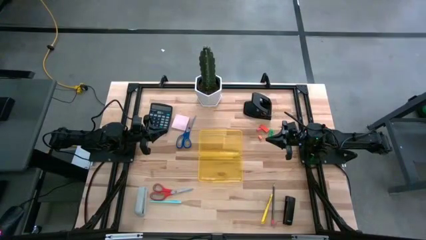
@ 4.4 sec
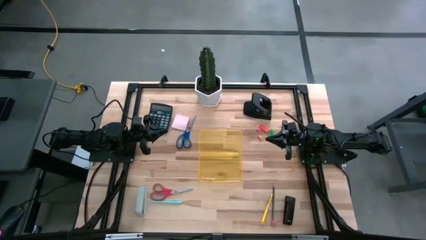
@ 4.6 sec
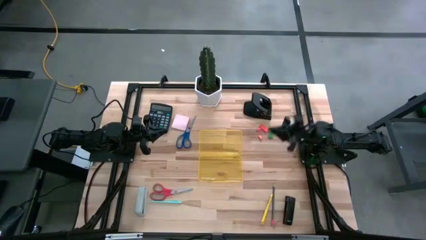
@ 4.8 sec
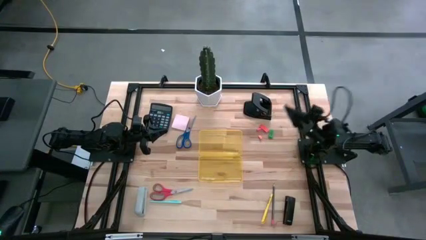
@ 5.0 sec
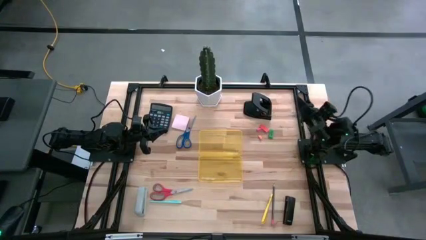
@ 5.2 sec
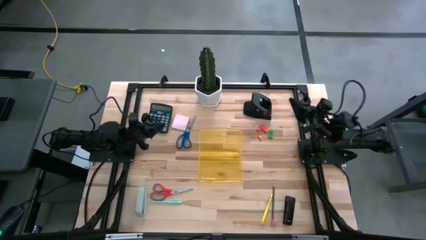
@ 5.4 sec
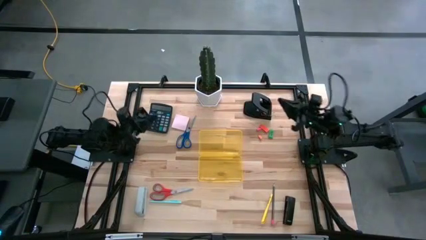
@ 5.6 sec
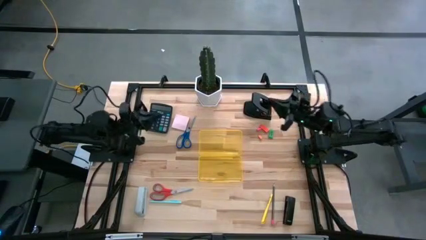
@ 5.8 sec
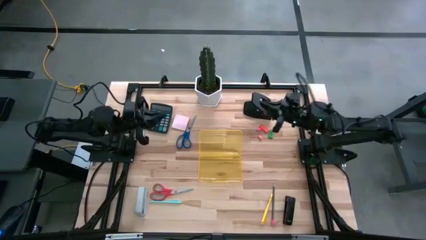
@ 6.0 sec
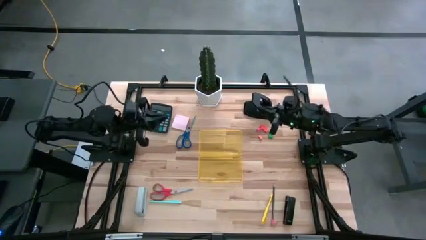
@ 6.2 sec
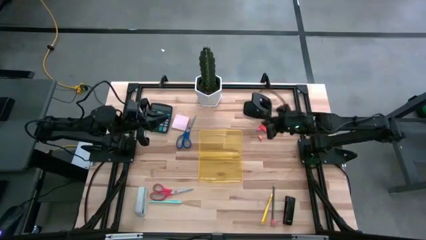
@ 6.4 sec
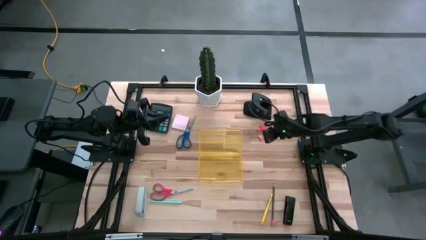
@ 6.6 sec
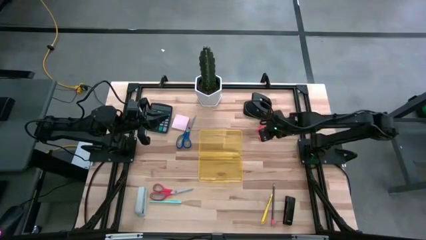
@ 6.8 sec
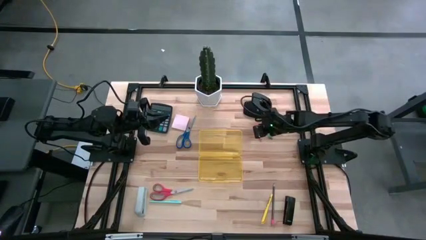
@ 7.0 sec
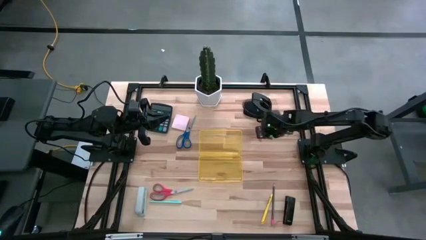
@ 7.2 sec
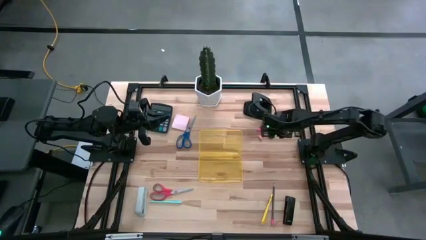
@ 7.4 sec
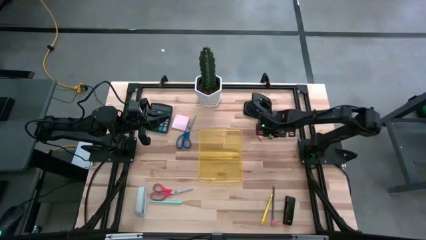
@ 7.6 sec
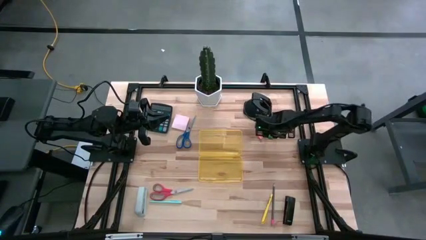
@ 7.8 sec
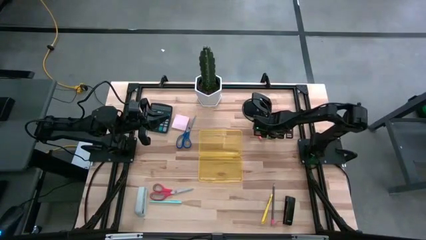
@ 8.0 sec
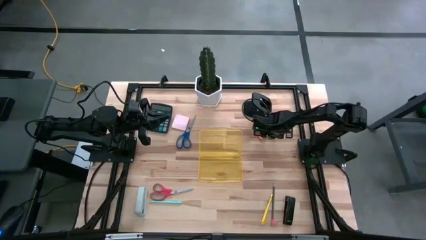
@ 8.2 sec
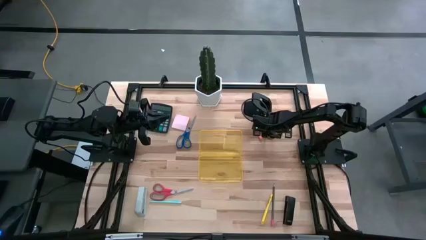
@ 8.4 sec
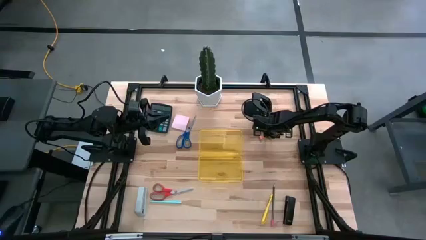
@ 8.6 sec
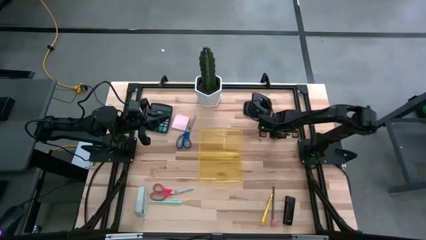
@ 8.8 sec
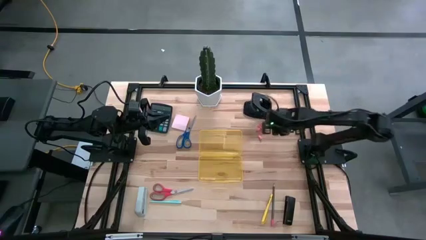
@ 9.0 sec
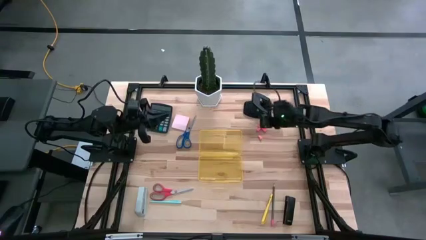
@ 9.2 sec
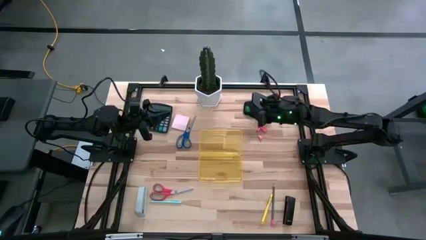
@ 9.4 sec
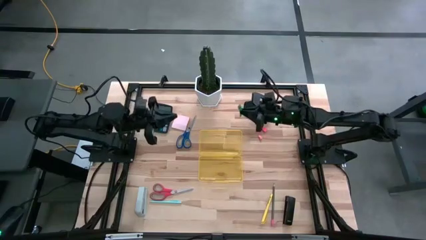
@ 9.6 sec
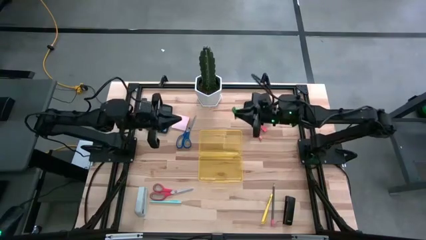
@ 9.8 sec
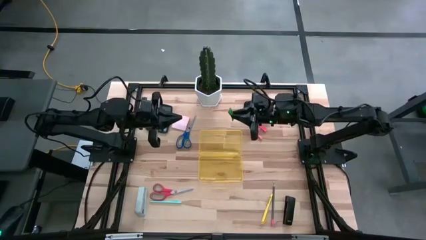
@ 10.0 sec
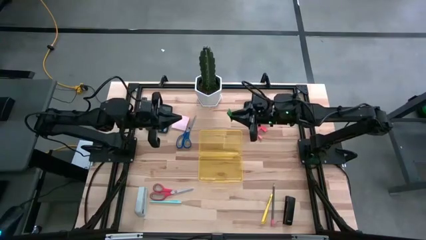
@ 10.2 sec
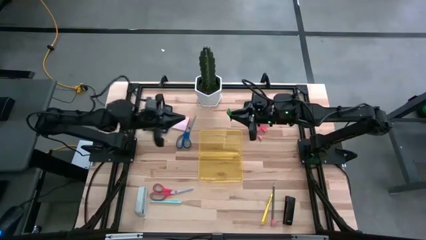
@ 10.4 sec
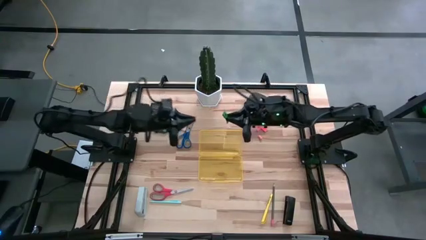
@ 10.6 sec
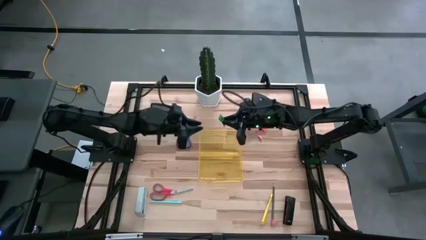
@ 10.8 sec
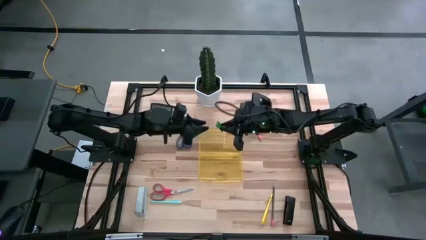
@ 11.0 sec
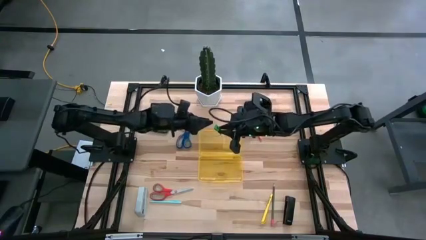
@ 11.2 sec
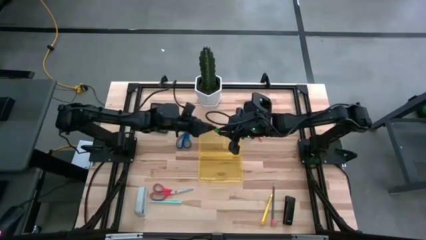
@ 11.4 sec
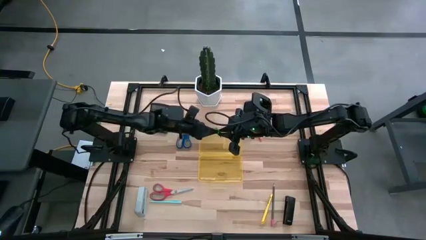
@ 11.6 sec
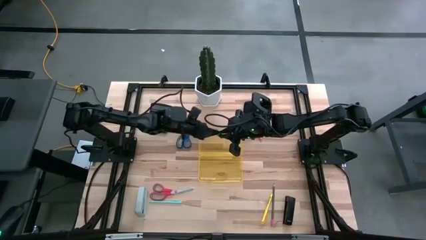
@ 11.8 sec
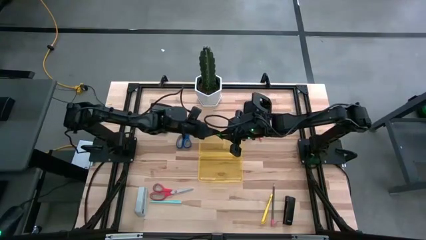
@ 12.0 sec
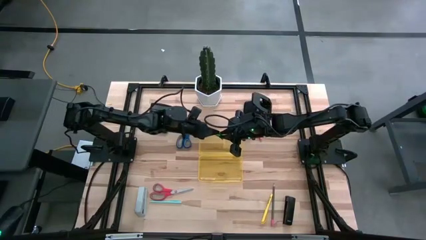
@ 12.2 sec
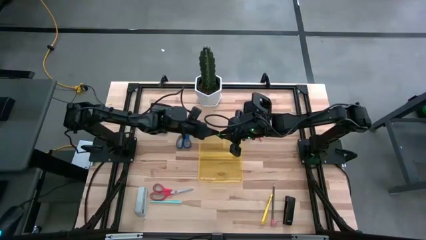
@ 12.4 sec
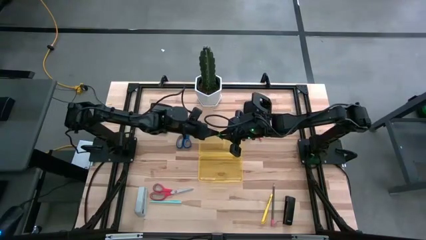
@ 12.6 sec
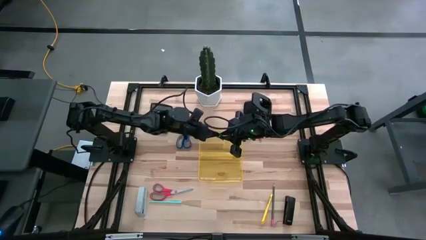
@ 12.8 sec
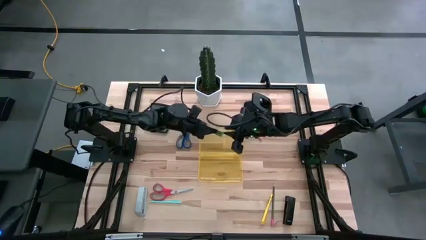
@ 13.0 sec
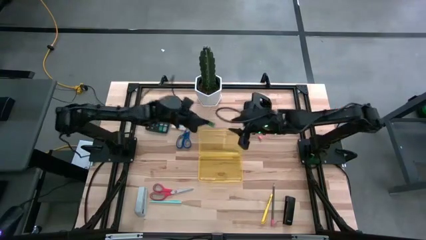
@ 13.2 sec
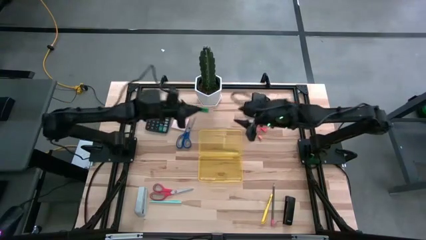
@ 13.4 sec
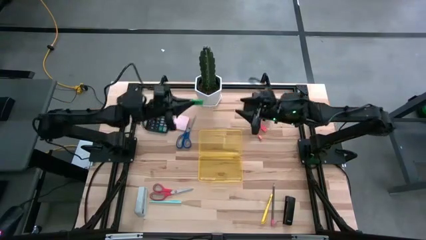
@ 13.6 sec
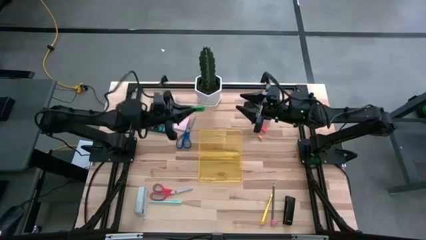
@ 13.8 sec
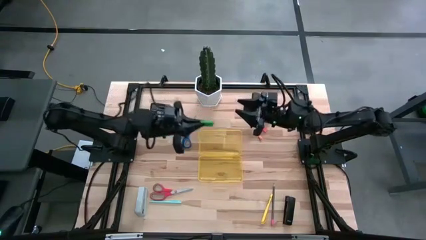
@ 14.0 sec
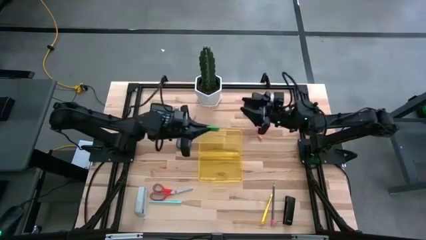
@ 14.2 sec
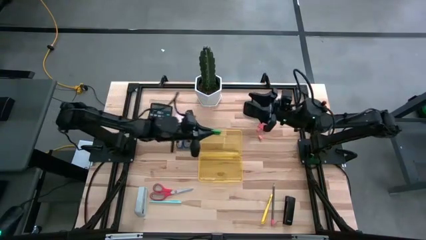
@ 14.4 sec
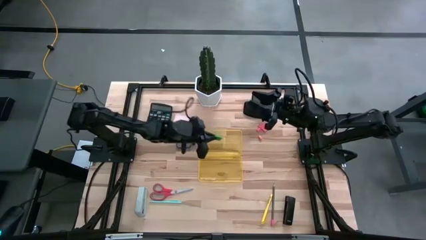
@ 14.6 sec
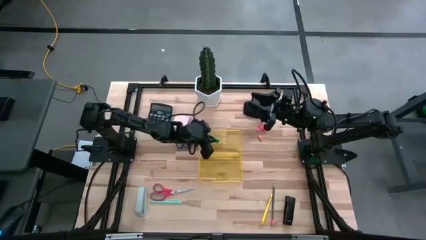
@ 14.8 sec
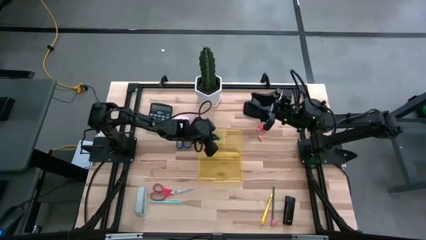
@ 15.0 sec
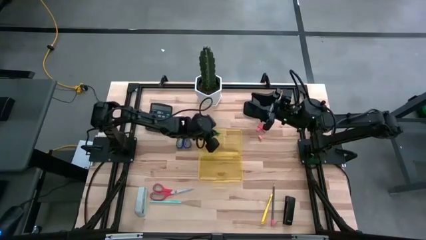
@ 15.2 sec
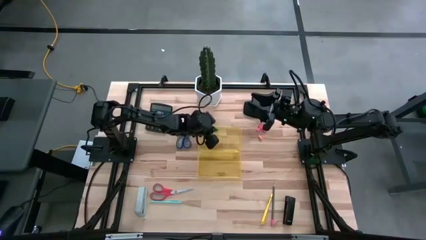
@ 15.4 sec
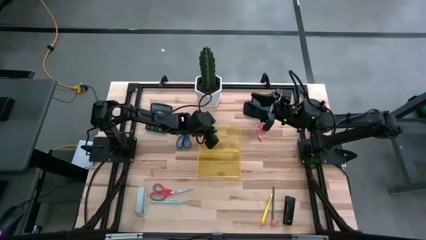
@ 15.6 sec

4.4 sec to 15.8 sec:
Task: Pack school essentials
Put the green eraser into the yellow supply box

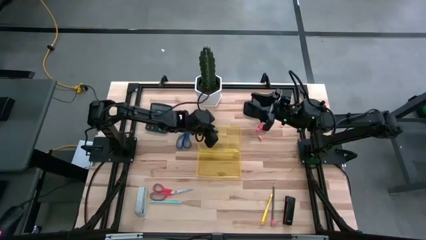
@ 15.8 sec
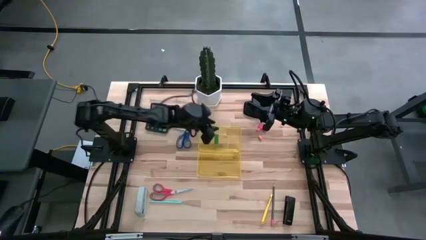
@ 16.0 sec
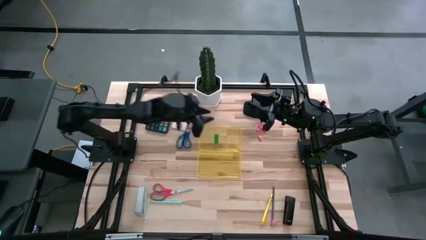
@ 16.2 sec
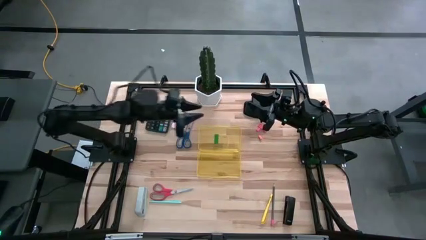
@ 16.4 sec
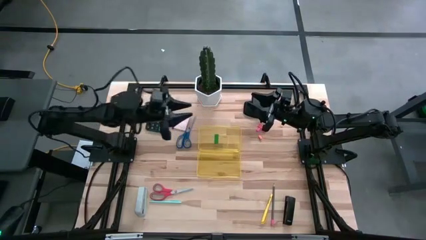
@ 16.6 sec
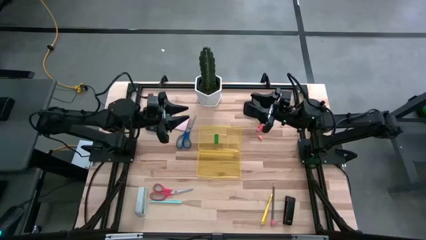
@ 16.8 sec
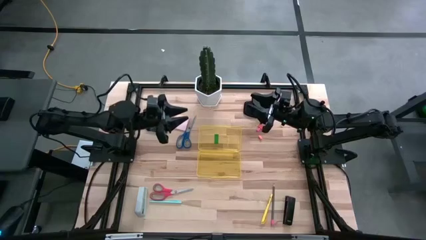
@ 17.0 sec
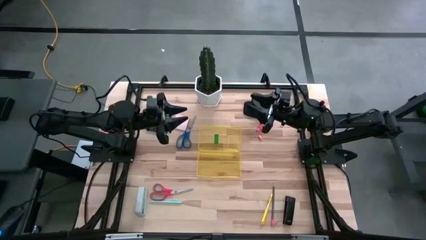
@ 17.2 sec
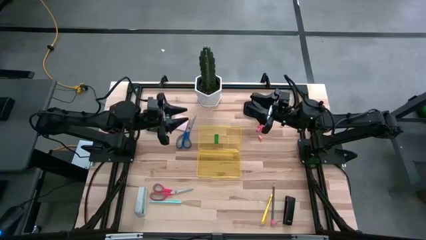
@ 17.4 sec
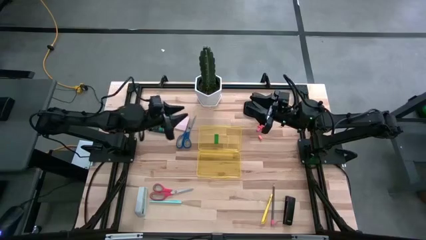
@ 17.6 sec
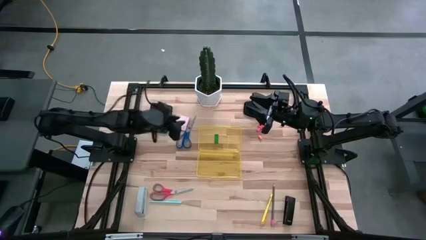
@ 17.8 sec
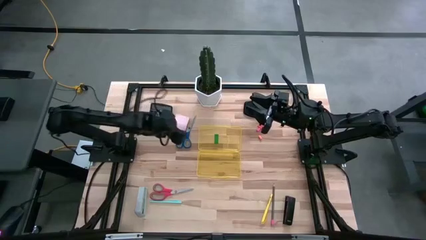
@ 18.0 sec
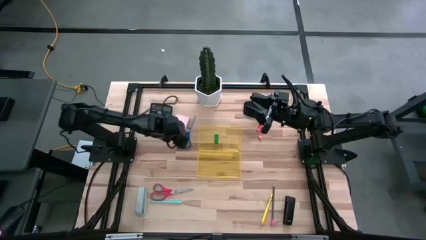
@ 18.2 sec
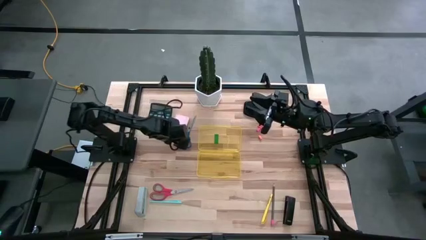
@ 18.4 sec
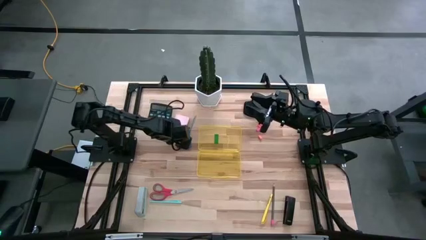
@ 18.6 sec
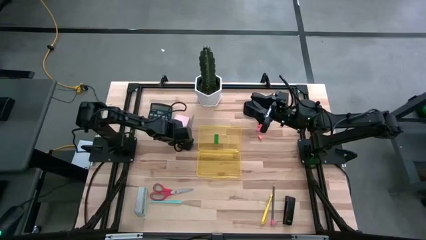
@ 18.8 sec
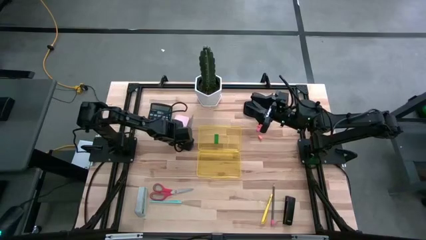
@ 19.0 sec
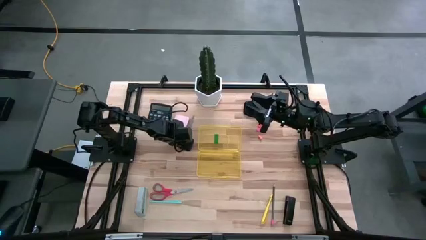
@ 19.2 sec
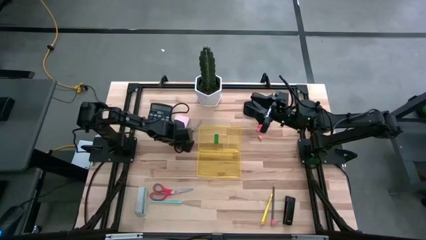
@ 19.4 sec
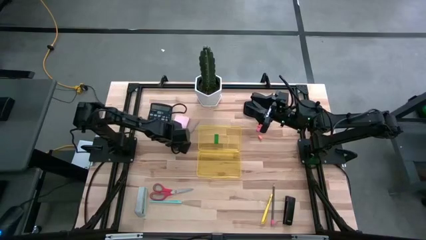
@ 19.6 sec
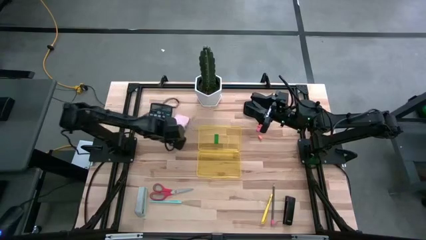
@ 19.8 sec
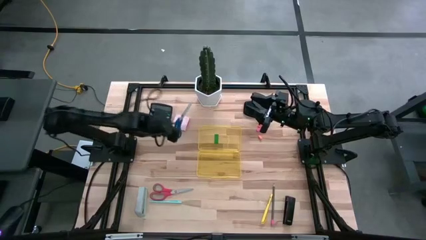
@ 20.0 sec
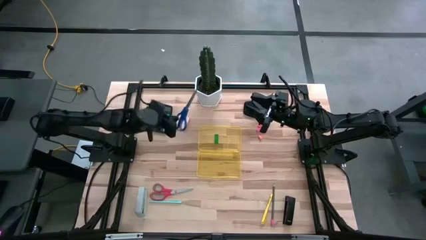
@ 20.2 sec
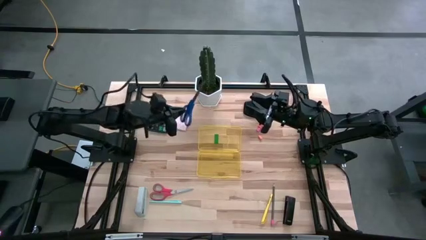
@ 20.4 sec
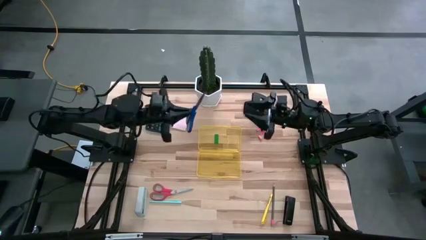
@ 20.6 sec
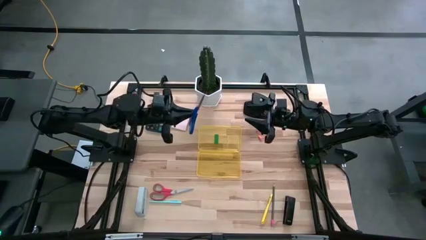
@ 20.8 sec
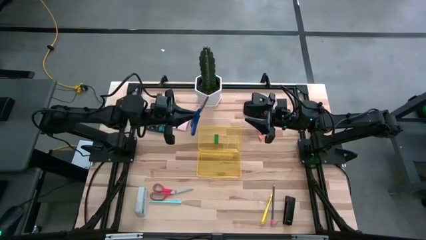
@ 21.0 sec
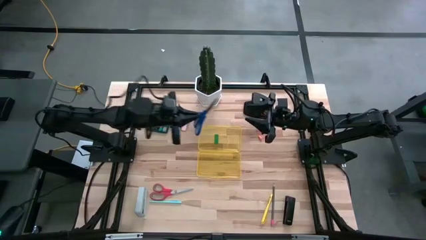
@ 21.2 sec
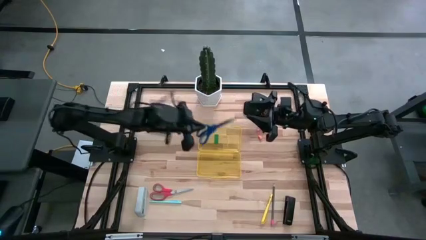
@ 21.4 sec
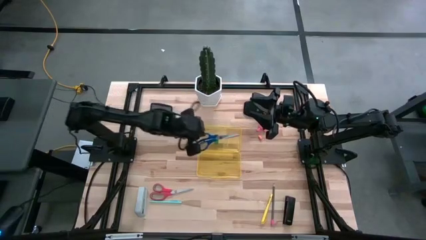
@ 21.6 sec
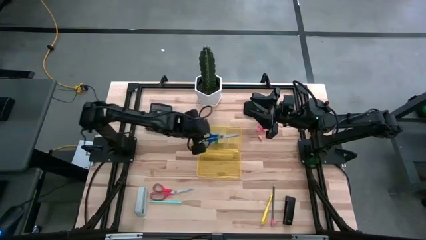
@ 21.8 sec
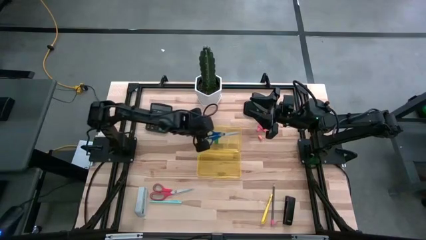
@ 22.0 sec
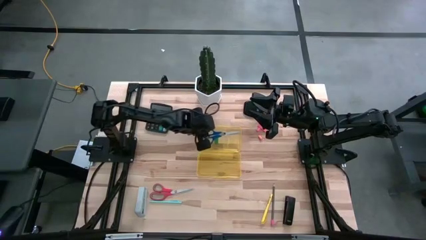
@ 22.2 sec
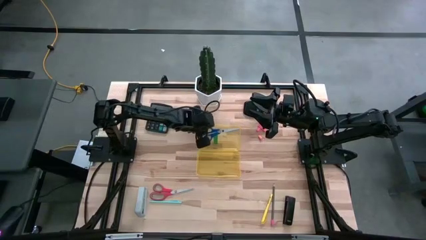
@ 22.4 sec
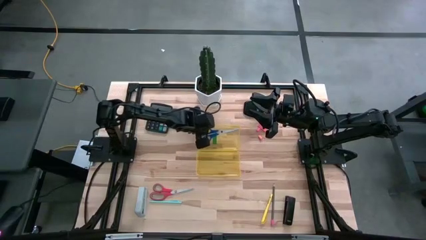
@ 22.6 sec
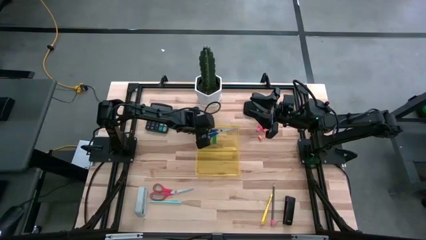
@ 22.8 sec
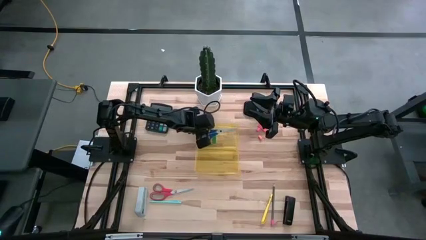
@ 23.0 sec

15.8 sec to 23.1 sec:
Put the blue scissors into the yellow supply box
